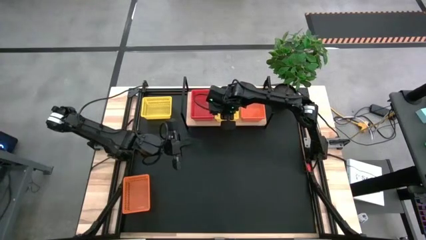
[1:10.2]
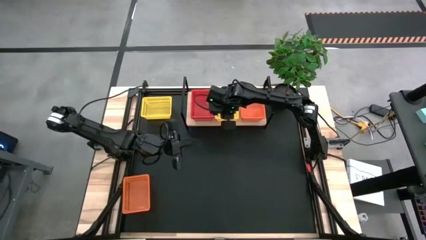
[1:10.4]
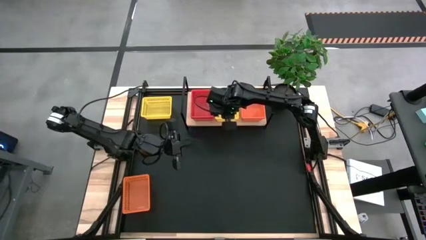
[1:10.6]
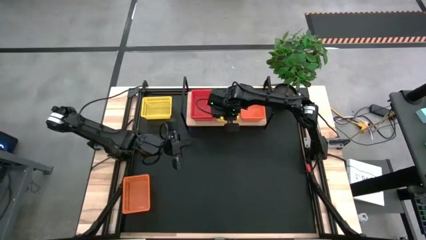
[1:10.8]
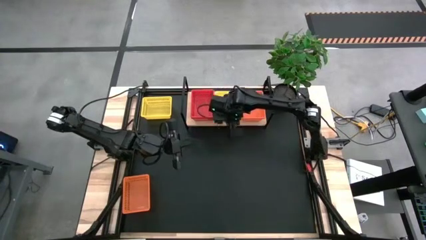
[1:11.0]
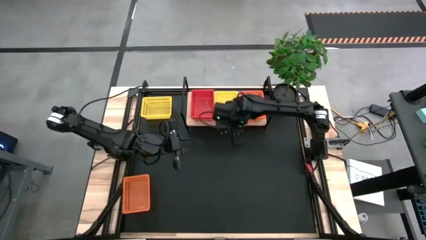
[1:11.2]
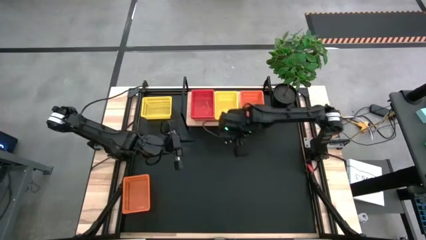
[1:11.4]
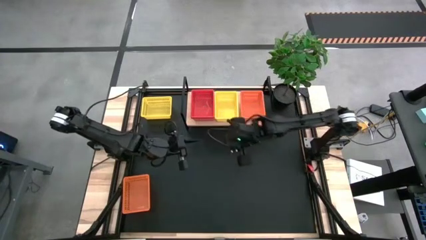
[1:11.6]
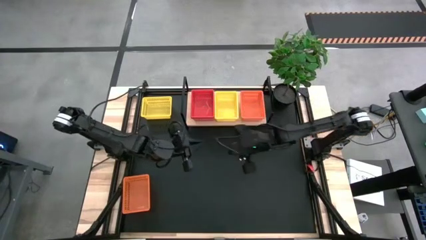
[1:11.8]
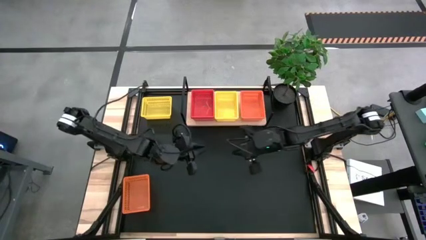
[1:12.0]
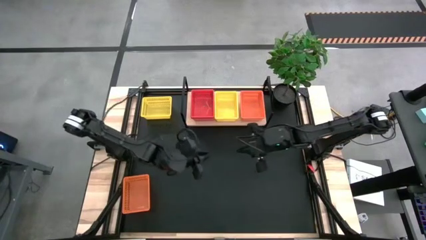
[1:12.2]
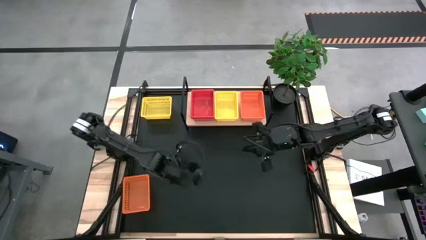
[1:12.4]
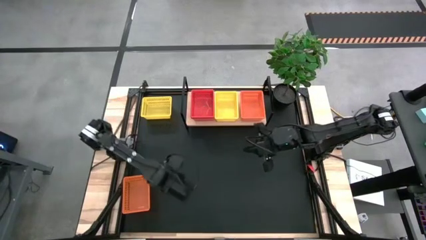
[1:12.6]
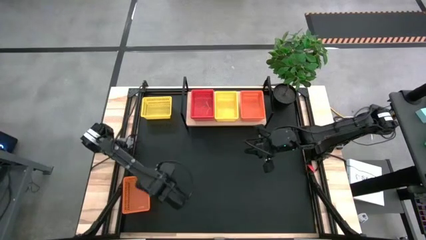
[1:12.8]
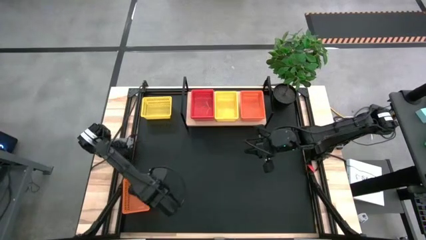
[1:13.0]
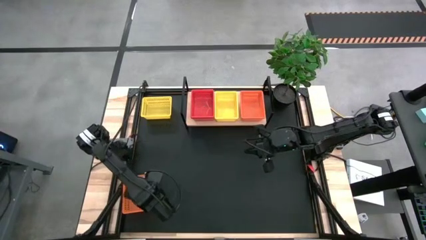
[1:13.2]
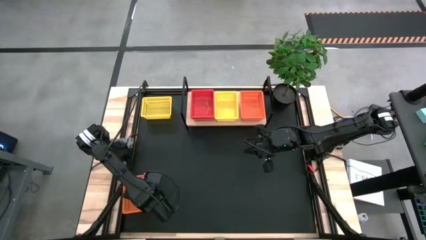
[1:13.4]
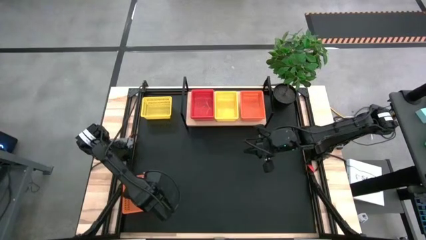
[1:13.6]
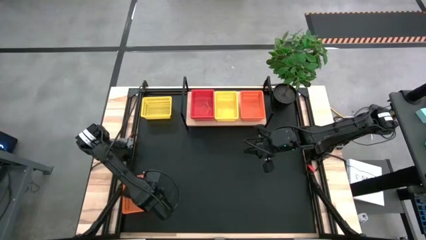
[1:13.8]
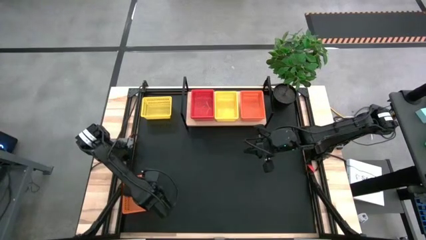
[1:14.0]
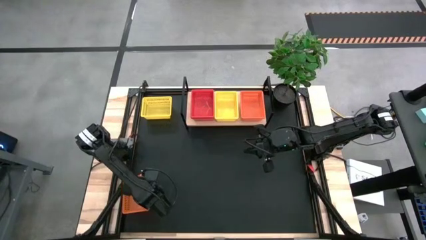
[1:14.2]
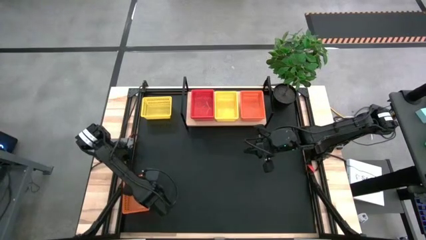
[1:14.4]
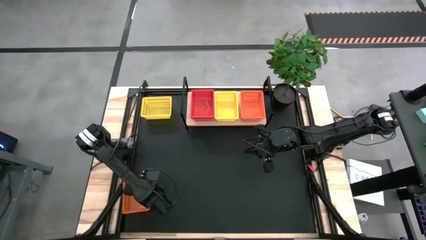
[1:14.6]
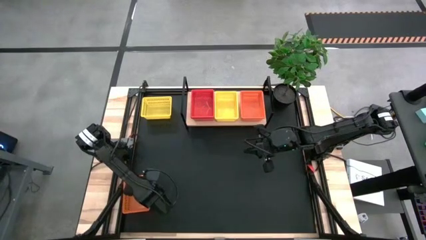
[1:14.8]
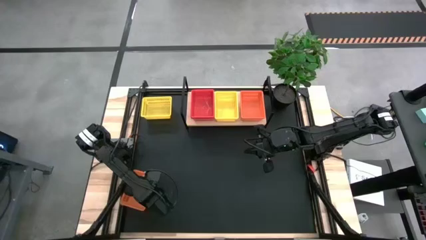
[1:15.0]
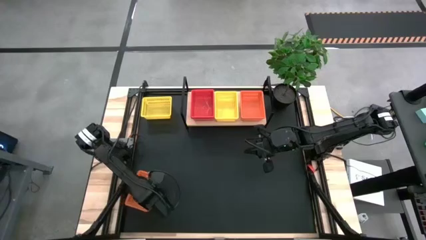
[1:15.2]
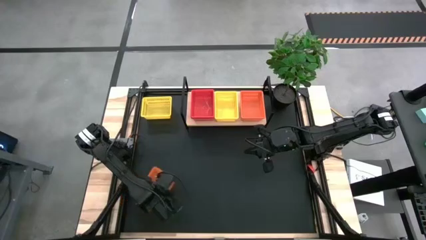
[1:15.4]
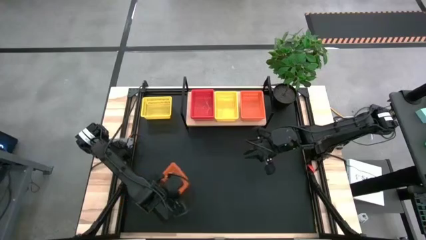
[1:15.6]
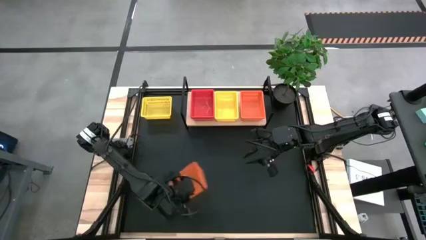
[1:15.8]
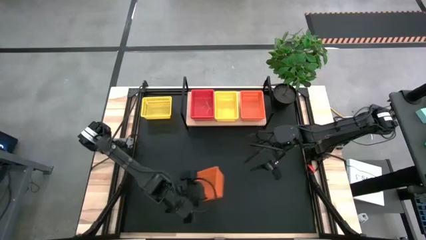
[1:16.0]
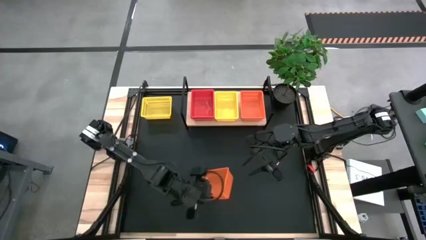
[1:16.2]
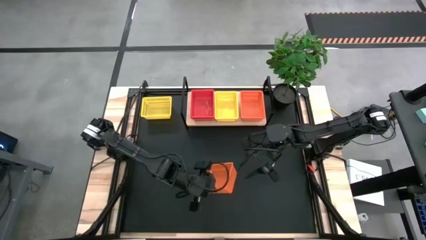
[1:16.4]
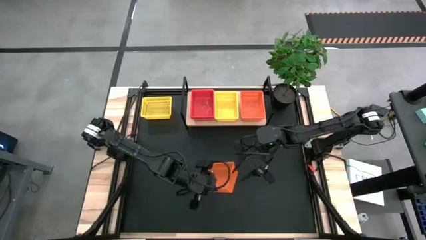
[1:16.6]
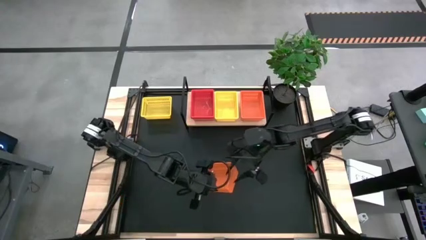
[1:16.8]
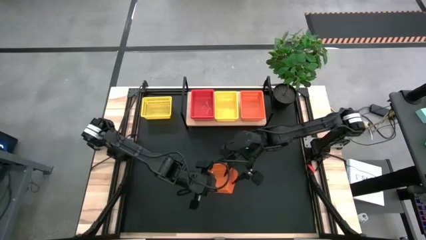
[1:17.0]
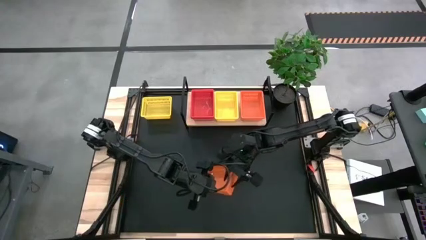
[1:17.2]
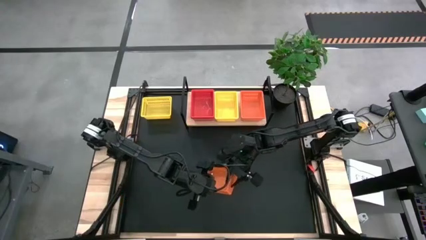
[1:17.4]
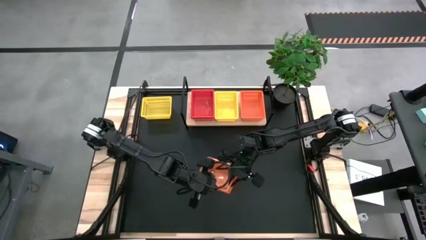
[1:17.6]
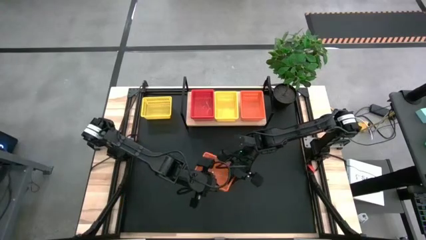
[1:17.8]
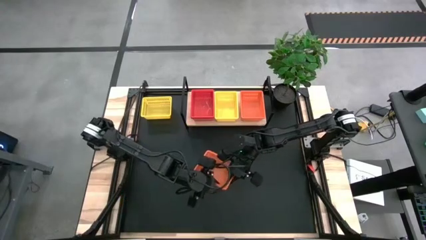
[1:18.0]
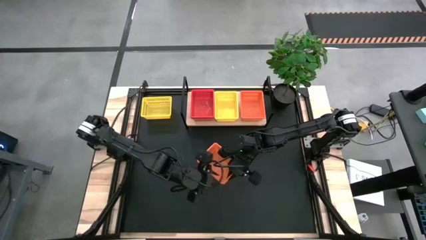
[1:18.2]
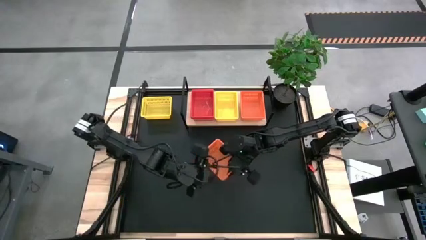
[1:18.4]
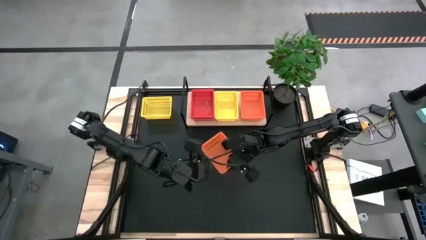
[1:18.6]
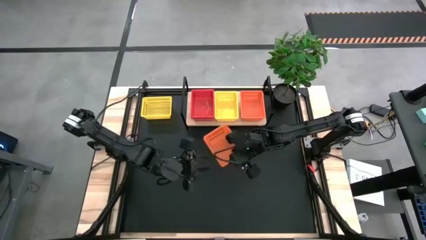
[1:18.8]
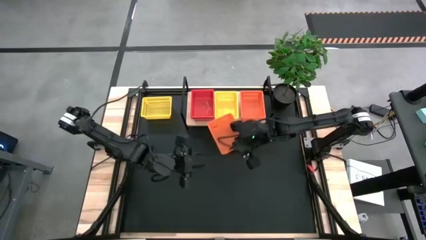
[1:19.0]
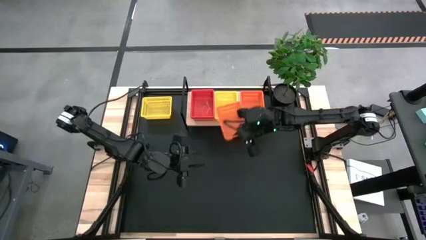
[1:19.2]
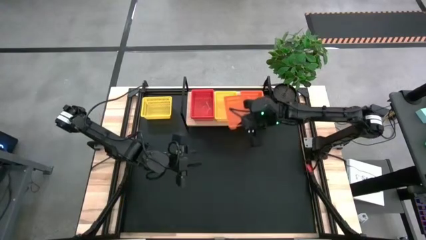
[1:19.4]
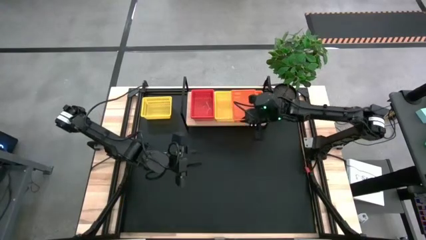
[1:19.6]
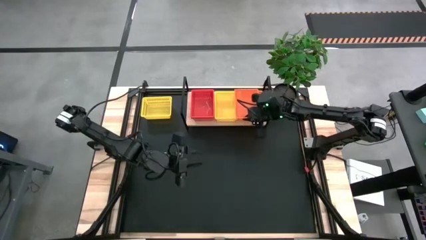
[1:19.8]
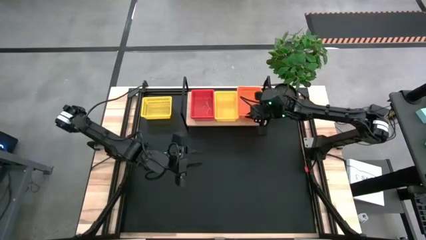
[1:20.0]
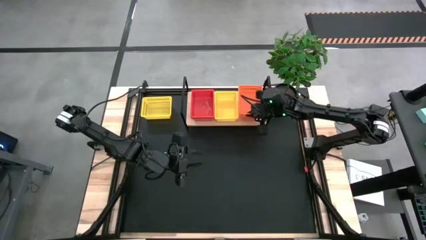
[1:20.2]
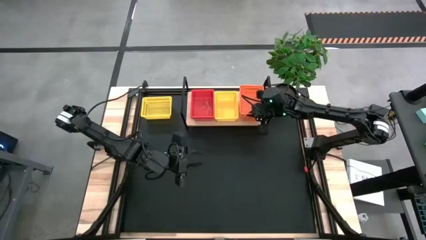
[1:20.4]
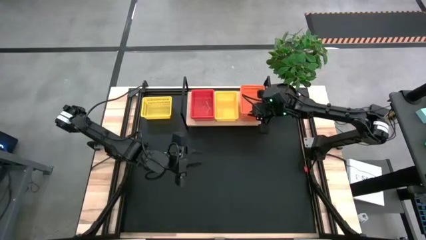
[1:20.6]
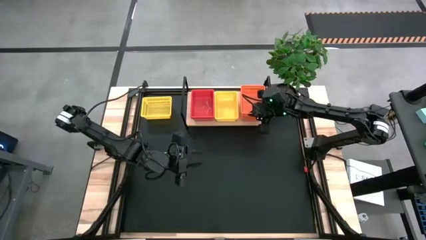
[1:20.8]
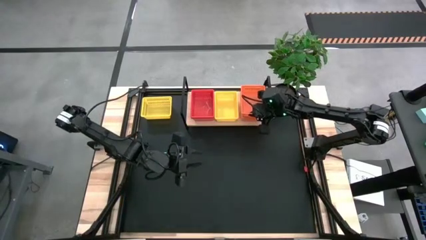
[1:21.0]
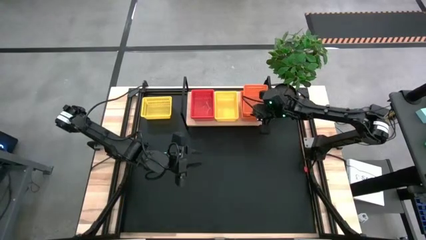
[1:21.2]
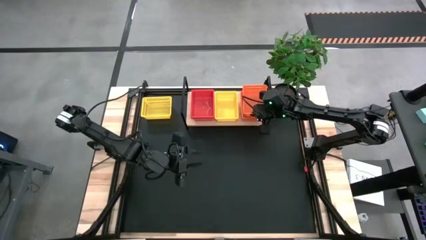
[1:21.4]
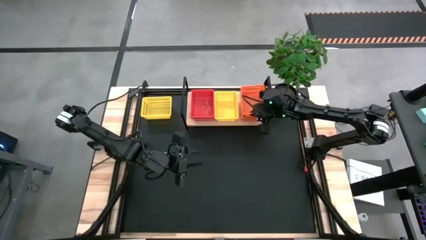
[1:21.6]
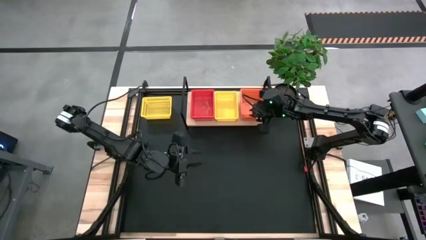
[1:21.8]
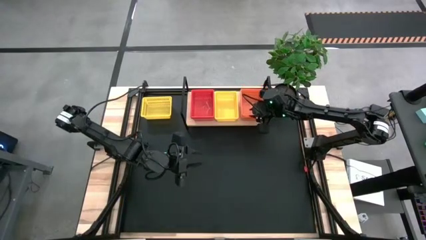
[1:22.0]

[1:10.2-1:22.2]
Task: Stack baskets on shelf by color
Stack the orange bin on top of the orange bin on the shelf

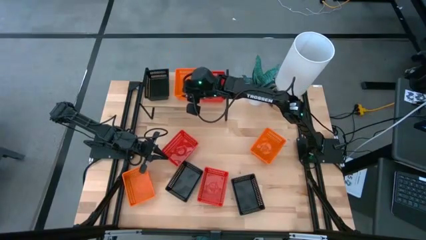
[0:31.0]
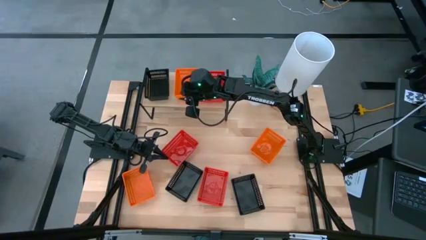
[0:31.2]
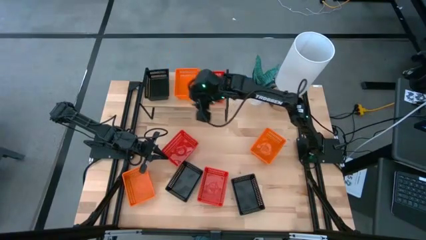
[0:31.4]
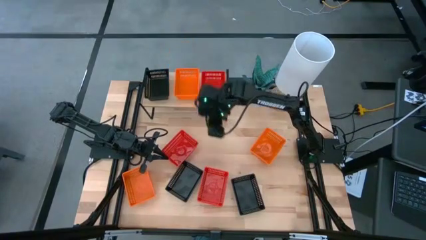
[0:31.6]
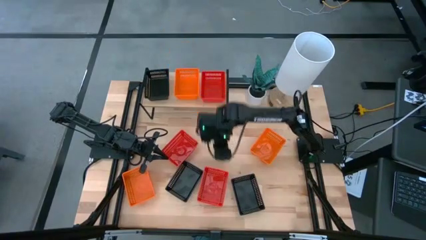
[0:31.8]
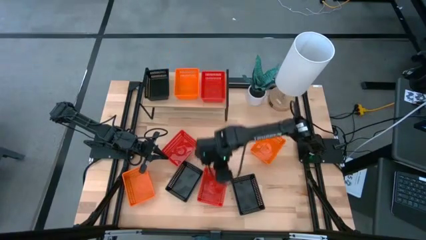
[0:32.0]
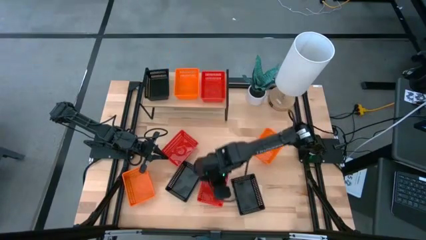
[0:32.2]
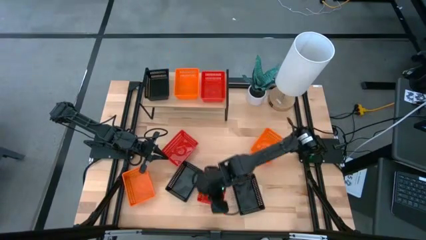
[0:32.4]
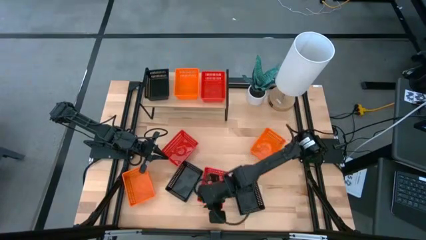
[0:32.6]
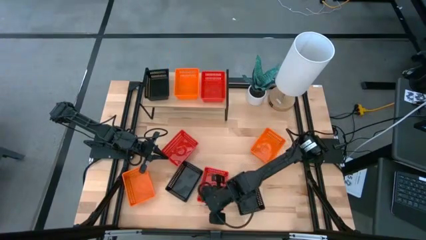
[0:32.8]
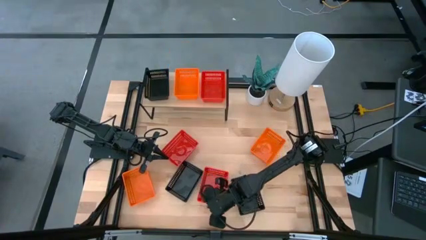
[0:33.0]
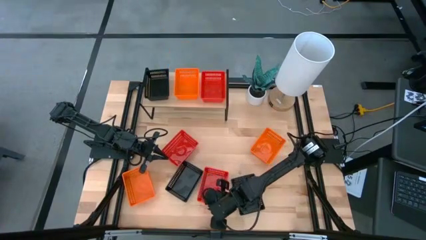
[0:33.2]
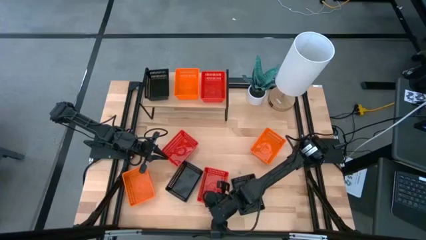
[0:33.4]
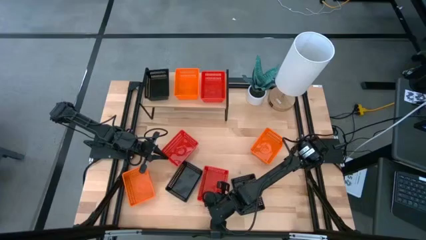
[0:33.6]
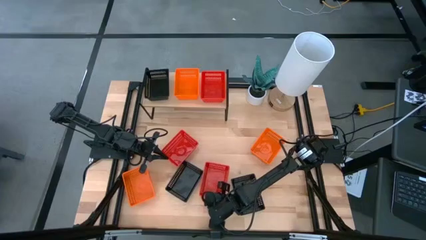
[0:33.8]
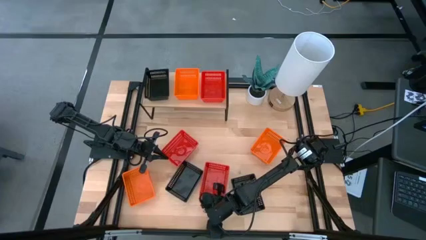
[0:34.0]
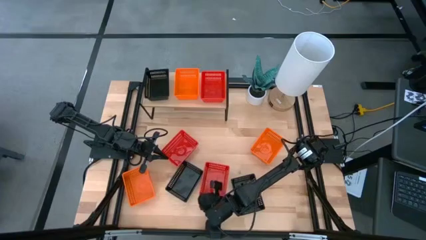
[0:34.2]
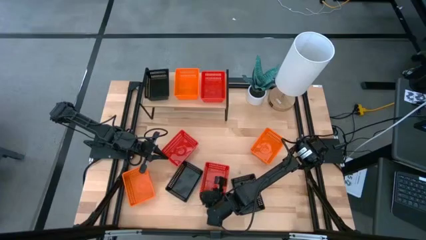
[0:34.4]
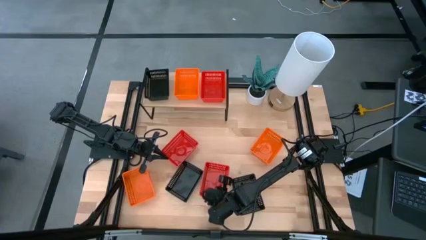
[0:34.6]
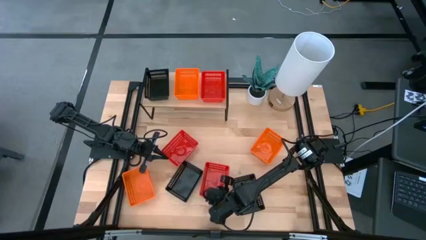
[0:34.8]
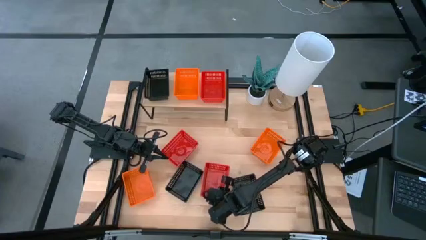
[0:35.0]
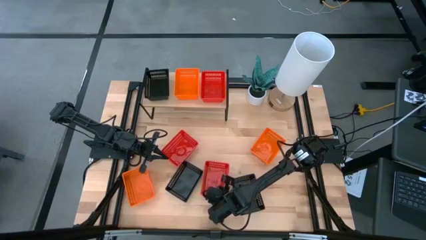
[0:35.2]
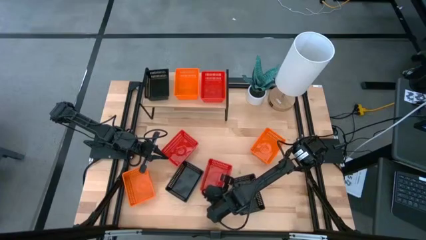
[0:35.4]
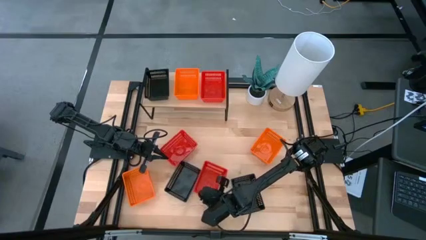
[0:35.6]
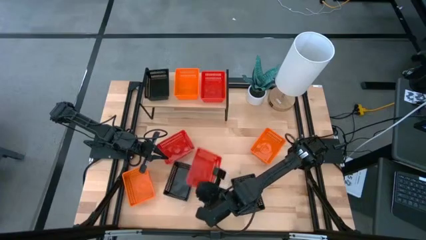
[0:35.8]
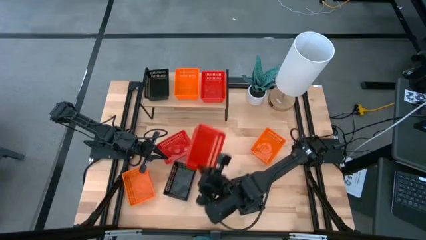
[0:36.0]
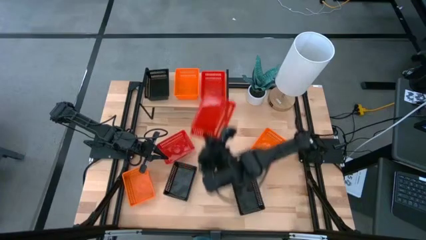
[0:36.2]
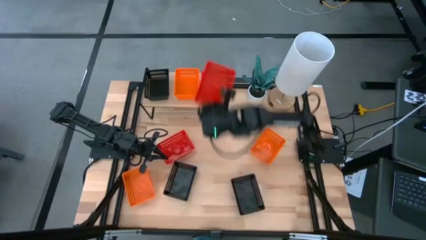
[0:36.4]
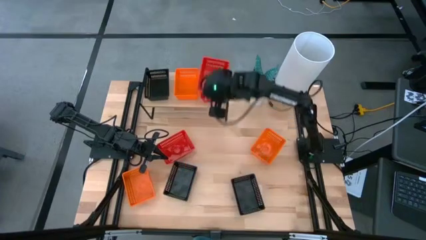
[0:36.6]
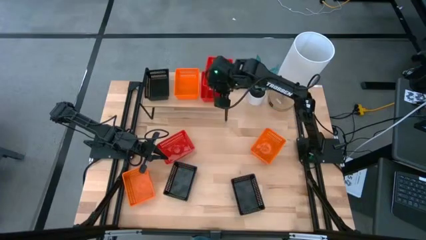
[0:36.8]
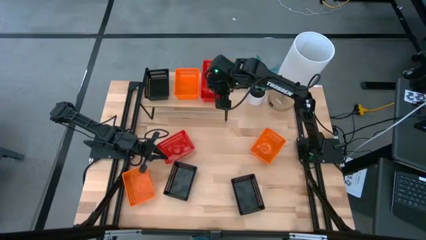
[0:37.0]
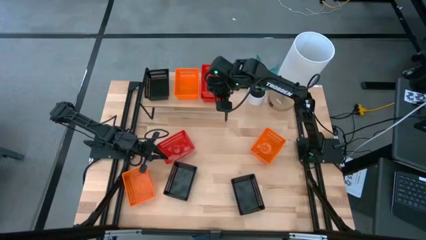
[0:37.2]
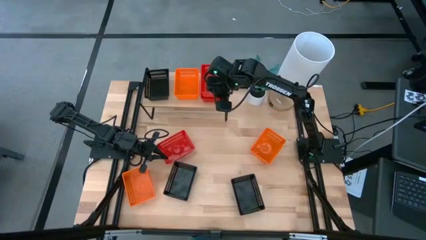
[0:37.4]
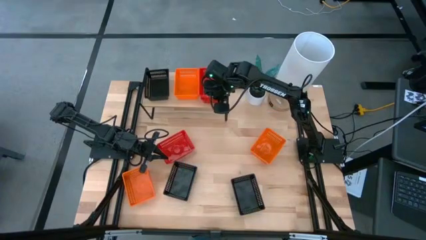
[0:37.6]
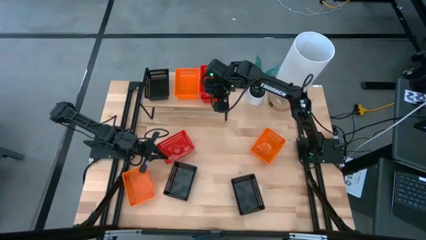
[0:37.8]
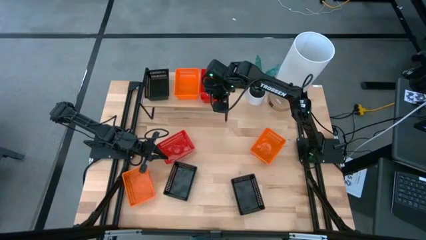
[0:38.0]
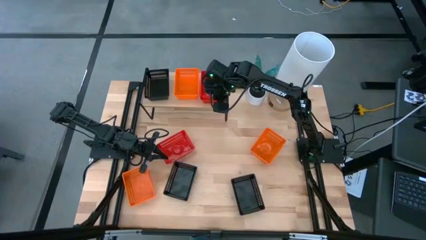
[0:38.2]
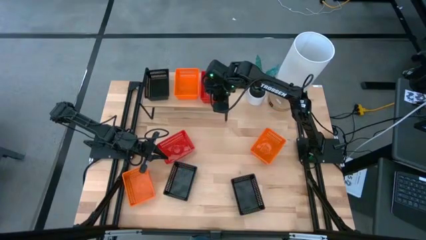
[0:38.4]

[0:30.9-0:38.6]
Task: Stack baskets on shelf by color
Stack the right red bin on top of the red bin on the shelf
